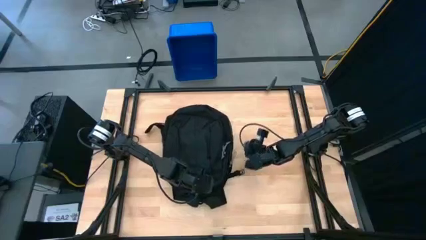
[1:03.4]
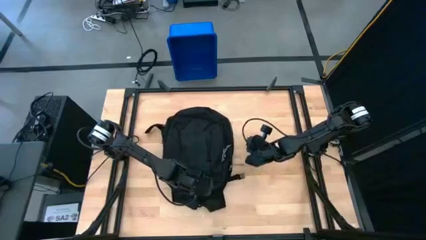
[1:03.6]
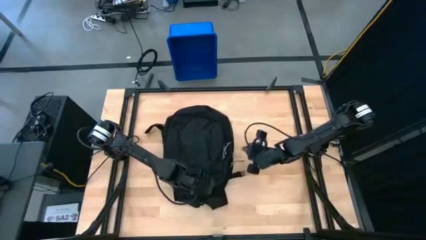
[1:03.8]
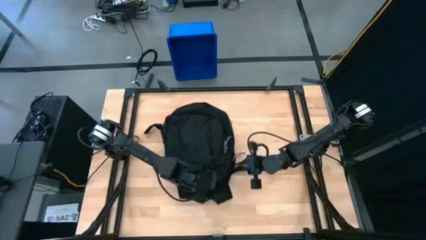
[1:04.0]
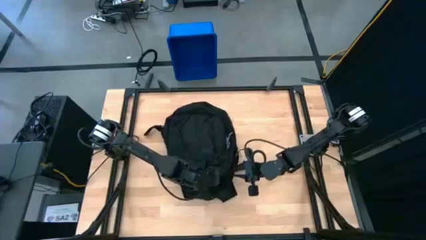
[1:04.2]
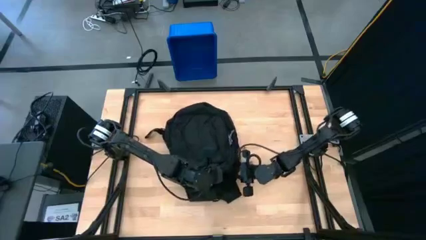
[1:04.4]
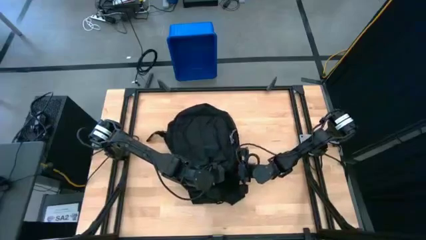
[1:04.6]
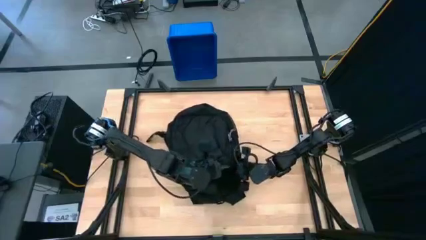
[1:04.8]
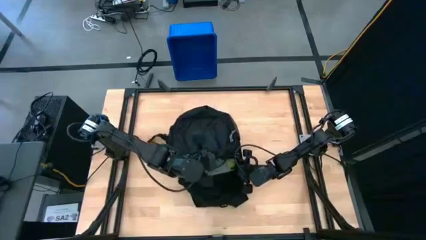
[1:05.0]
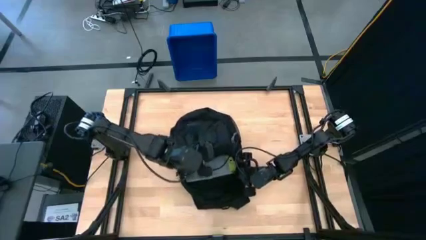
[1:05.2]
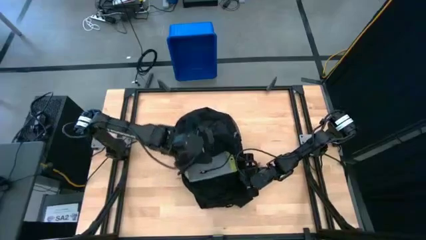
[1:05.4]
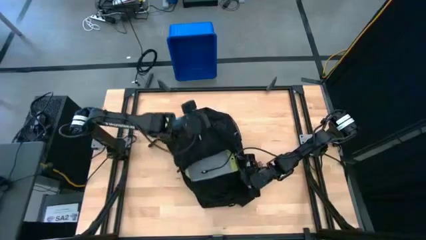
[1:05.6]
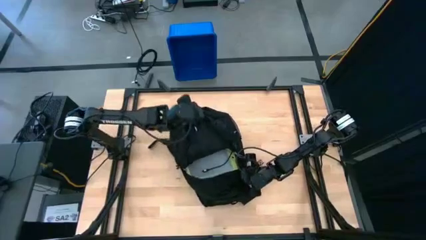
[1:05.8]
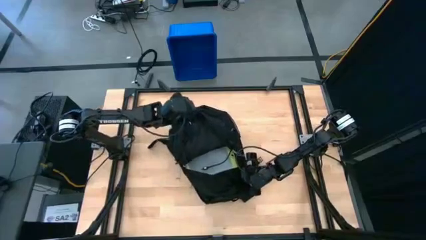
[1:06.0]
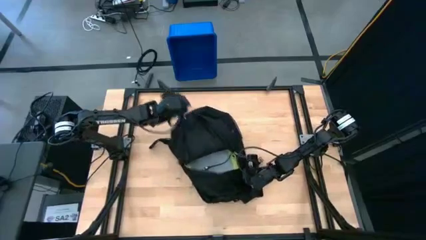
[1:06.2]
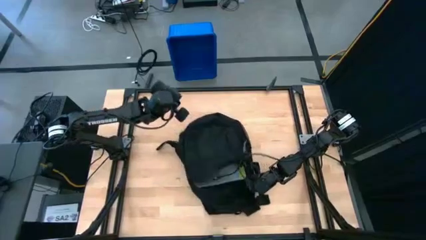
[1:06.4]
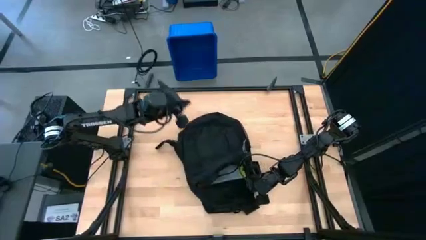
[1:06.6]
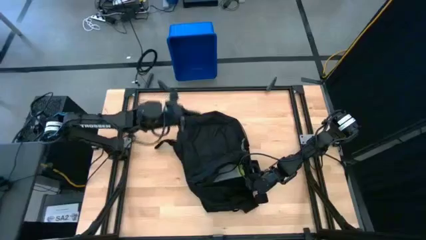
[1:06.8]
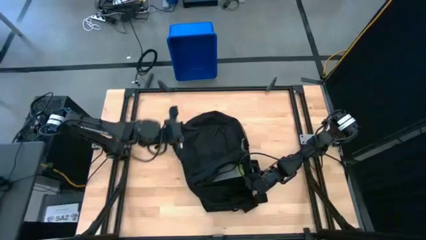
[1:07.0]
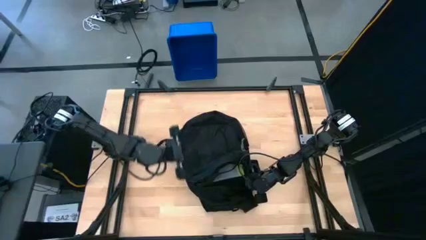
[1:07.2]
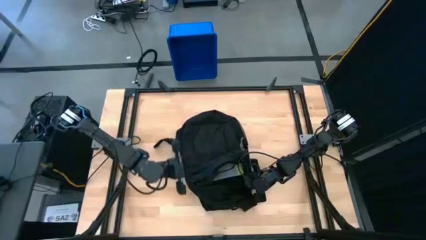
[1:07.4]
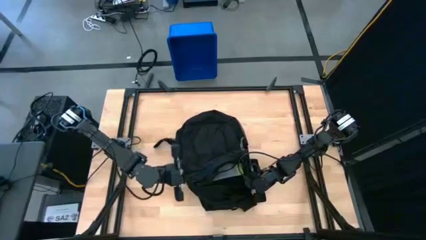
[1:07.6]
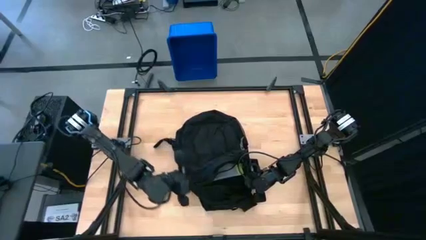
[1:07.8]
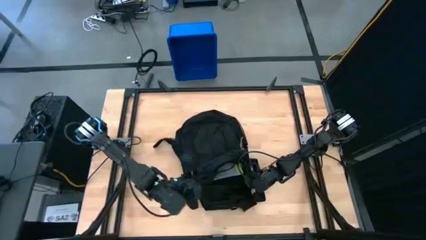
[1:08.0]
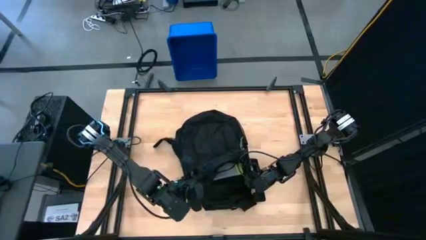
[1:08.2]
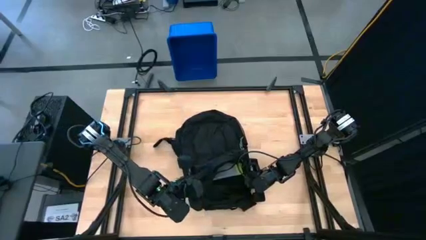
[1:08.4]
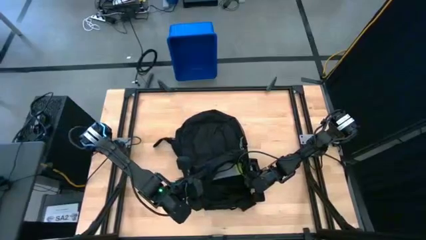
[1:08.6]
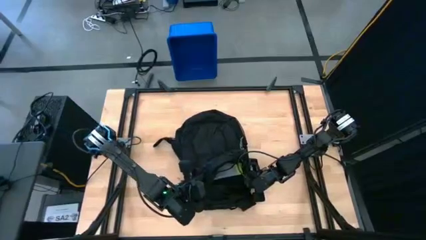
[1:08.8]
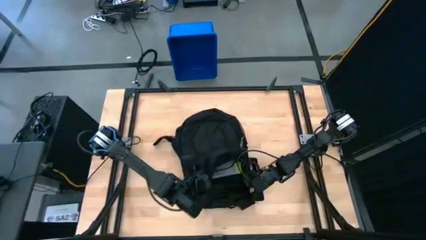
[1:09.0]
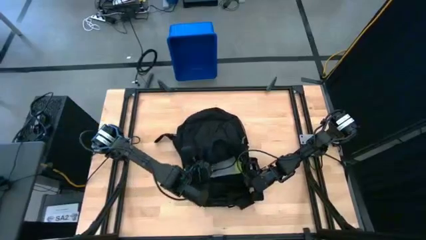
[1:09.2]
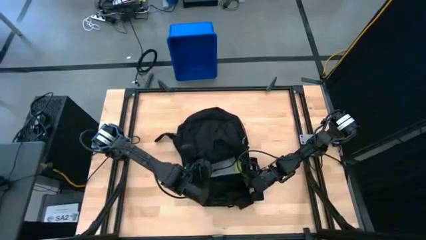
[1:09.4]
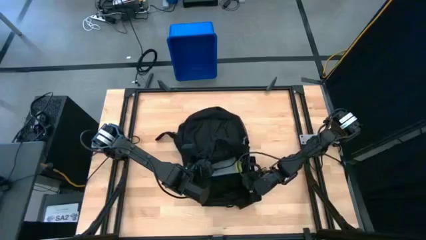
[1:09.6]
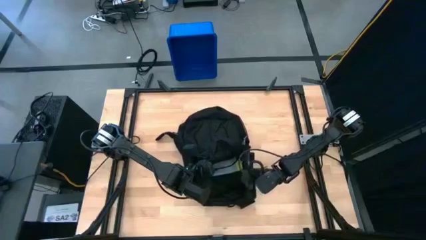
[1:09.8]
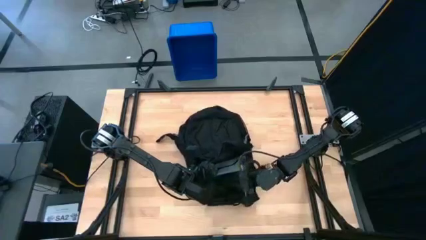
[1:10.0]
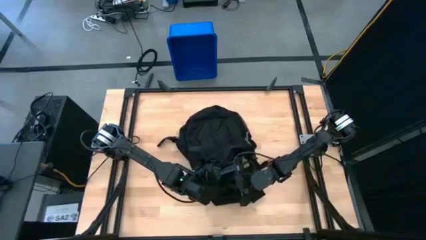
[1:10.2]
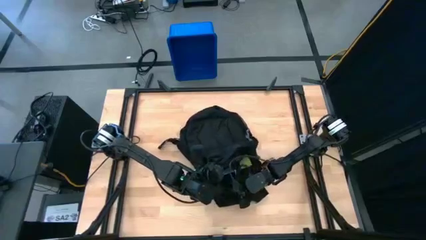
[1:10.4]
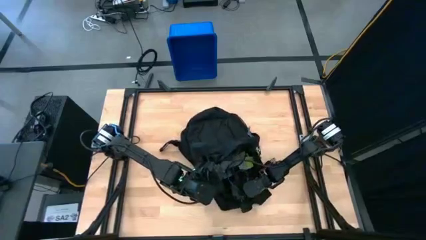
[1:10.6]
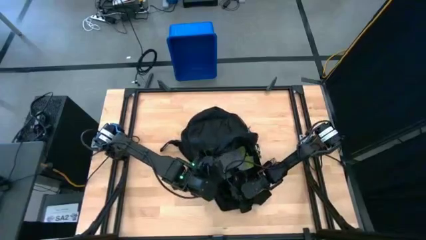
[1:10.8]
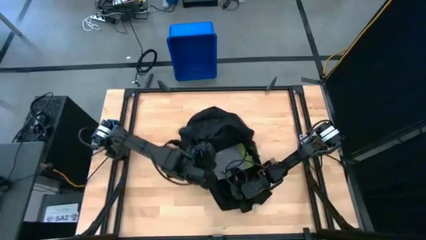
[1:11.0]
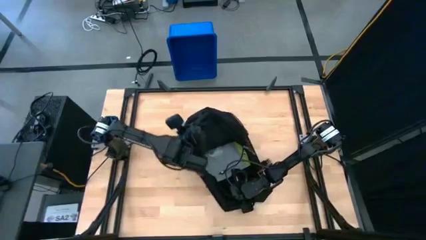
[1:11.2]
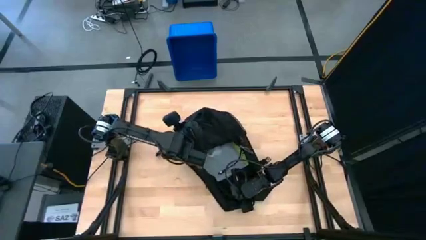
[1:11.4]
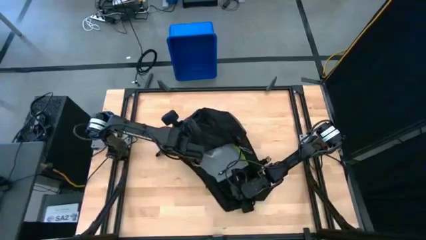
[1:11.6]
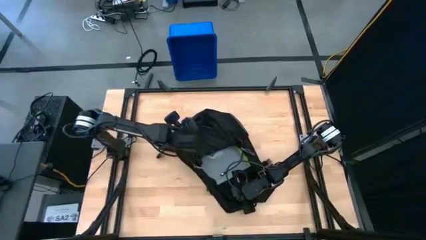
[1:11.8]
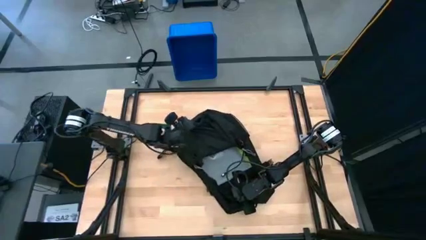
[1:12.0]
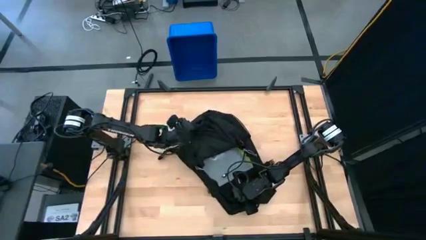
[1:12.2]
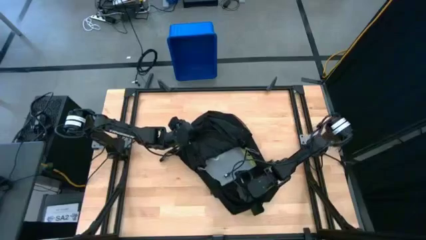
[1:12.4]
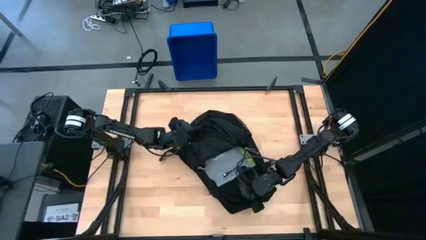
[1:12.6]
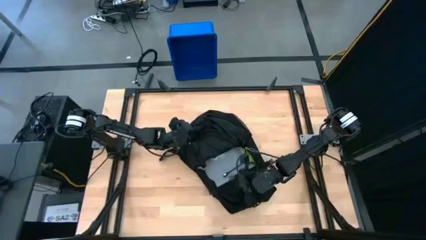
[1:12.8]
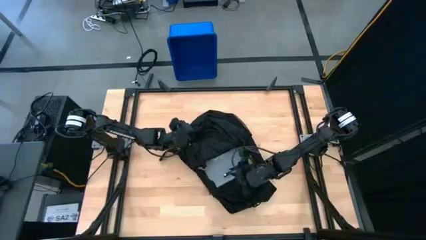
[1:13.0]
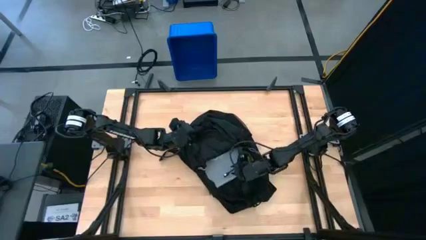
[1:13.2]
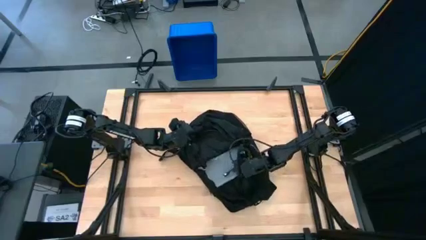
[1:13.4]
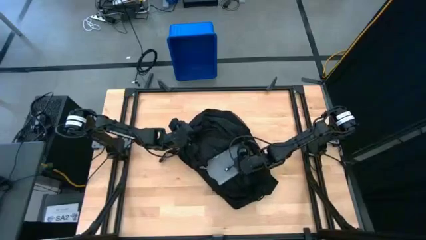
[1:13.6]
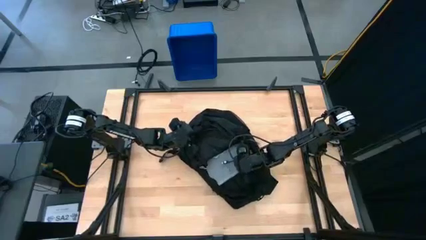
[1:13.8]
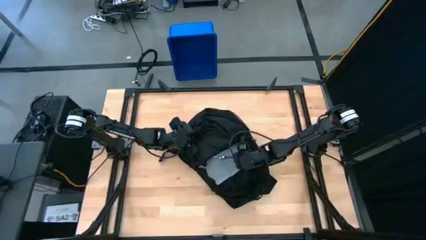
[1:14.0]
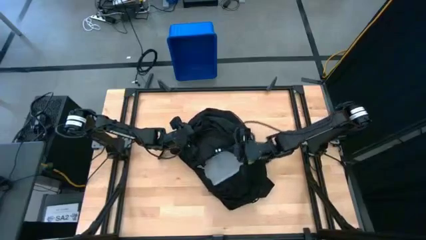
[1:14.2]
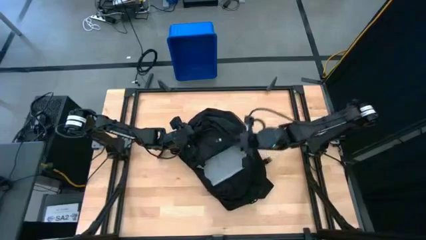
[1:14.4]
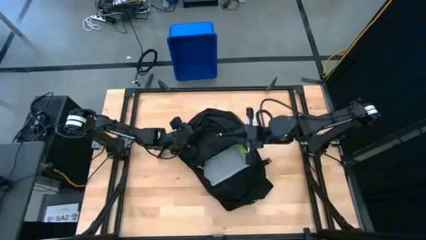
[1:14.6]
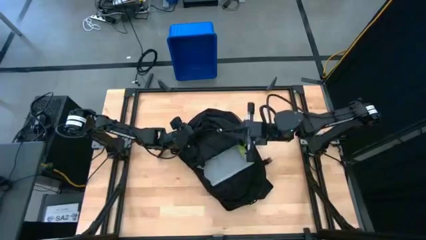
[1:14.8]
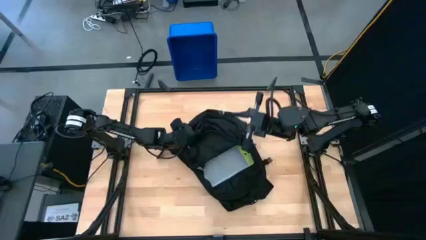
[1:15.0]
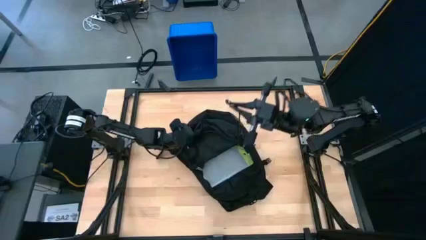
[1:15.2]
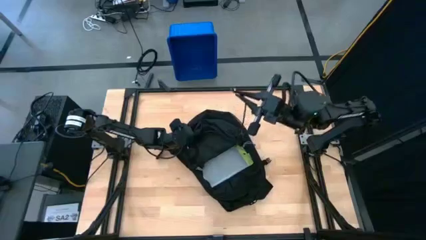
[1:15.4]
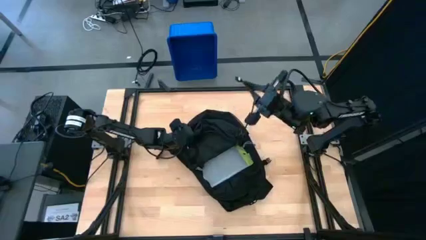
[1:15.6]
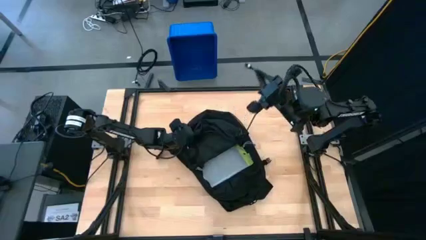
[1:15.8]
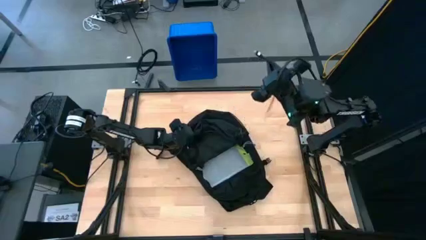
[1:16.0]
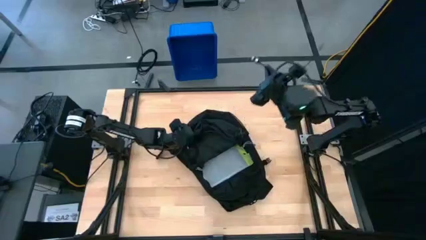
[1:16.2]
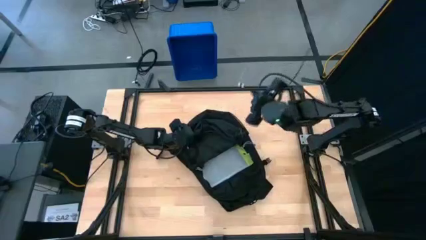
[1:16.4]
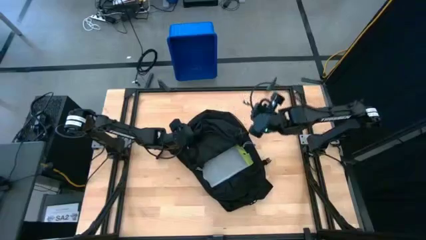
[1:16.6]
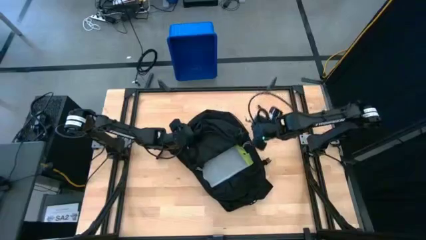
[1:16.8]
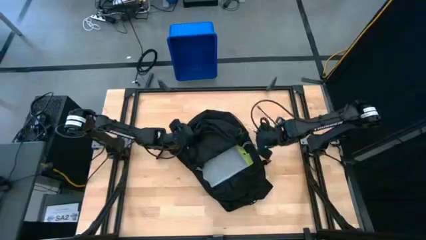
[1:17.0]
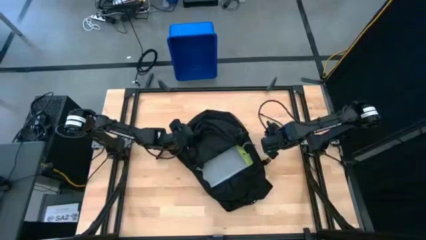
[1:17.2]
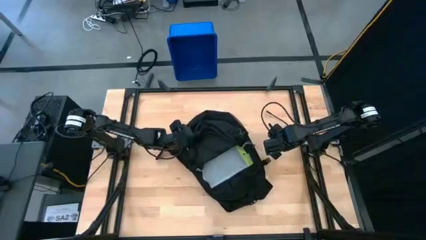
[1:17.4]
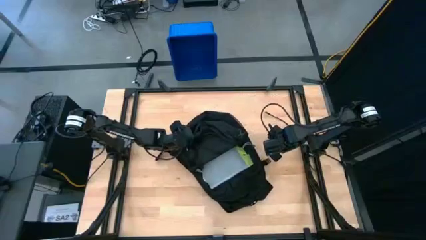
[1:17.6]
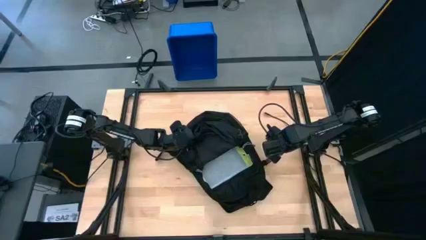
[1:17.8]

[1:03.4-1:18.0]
Task: Unpack backpack
Remove the usb cable from the backpack

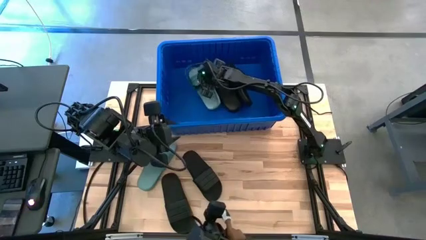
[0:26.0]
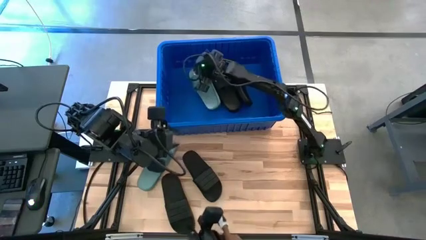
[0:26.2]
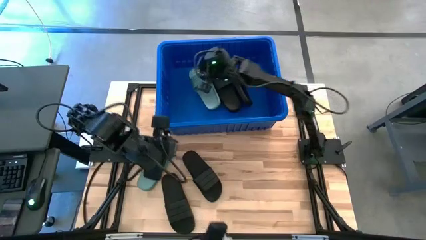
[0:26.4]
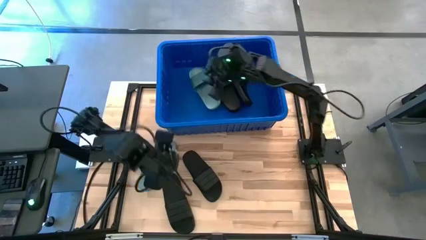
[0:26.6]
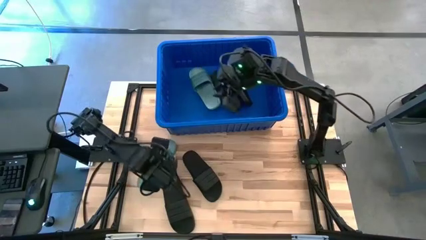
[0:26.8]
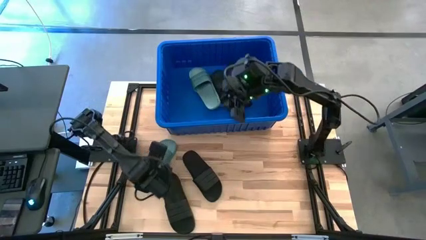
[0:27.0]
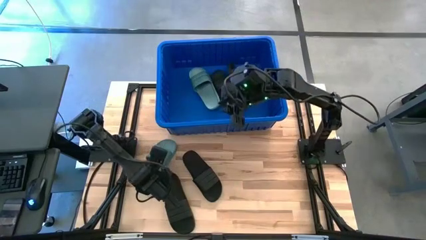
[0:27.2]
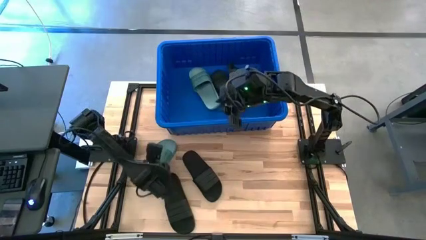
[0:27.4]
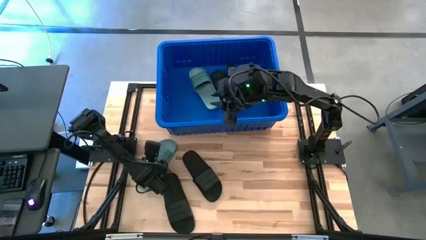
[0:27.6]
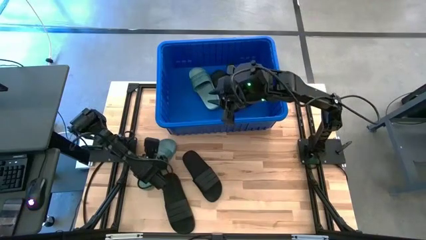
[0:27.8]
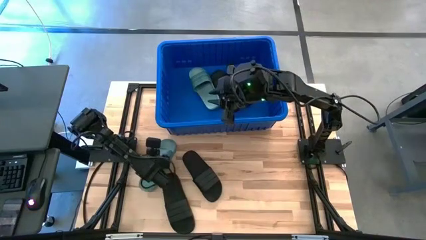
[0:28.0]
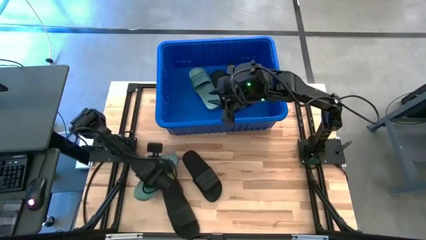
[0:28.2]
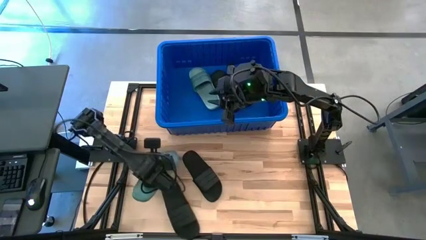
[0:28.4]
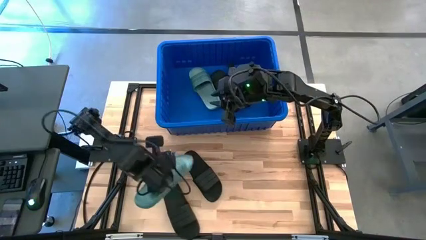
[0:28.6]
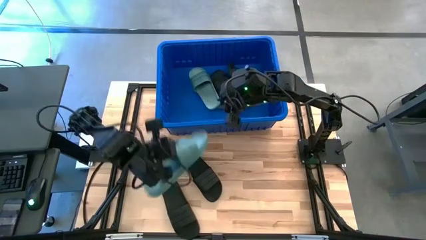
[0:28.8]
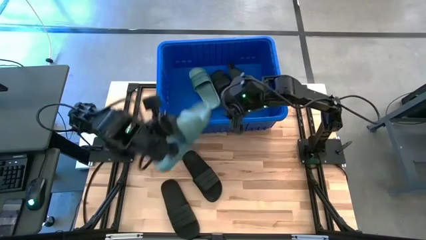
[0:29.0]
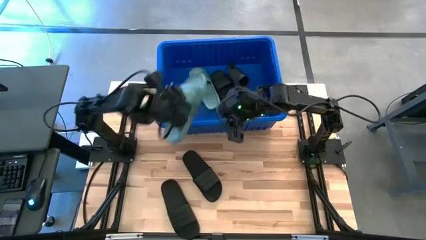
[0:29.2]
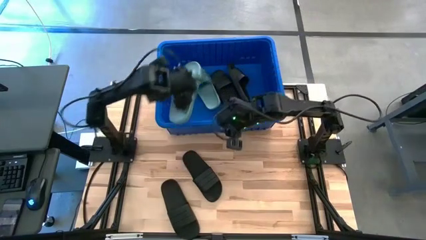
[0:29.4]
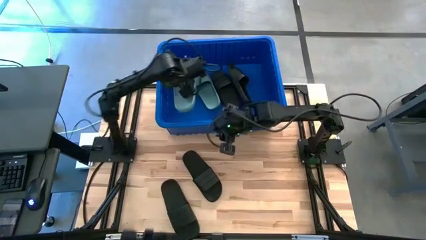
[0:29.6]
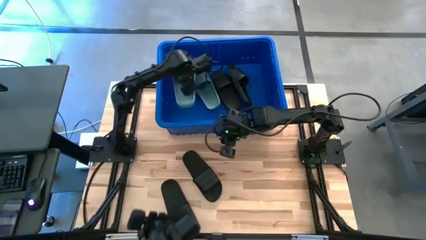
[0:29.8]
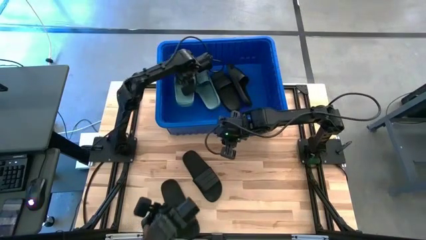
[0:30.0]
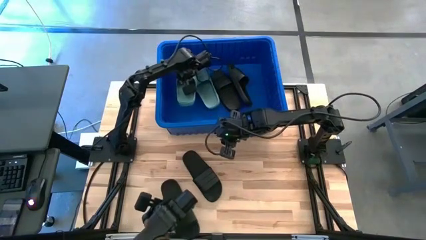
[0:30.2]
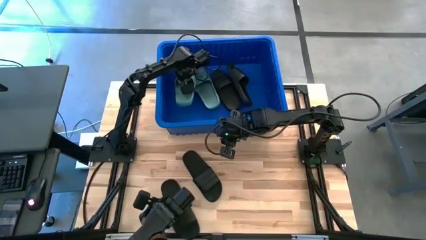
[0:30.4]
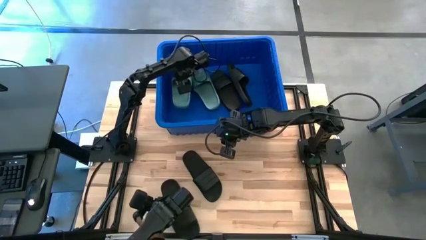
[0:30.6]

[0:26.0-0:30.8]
Task: Pick and place slides into bin
Put the green slide into the blue bin
